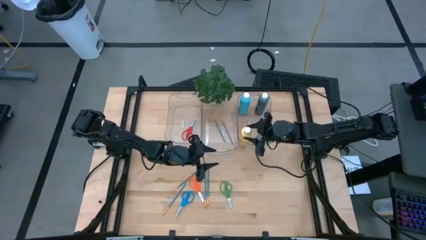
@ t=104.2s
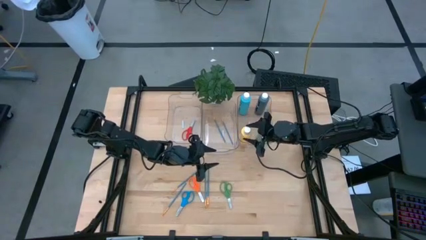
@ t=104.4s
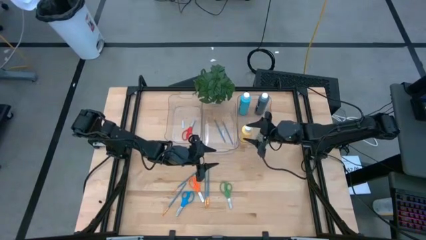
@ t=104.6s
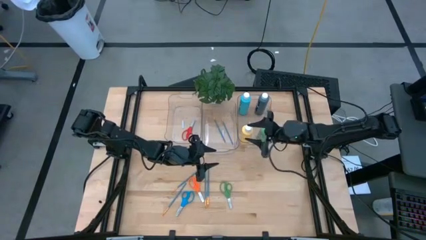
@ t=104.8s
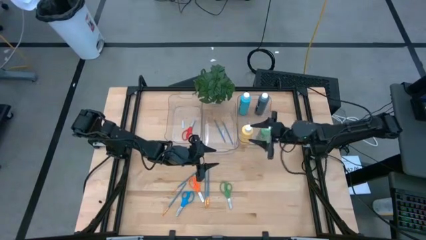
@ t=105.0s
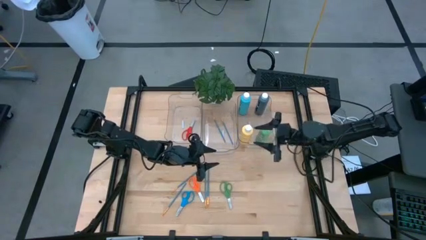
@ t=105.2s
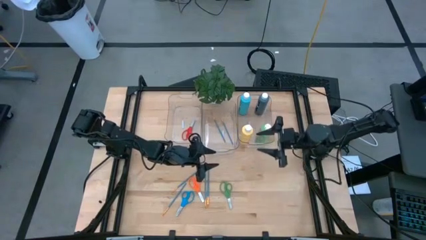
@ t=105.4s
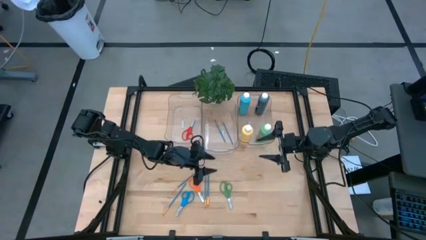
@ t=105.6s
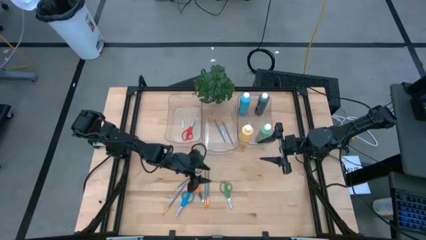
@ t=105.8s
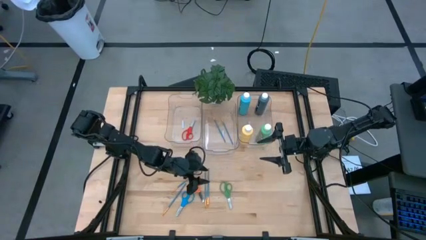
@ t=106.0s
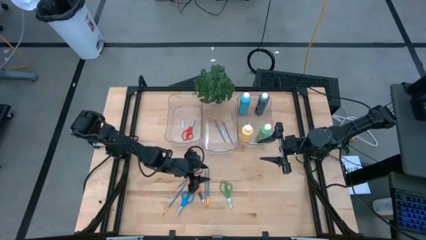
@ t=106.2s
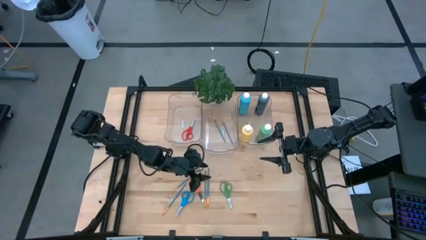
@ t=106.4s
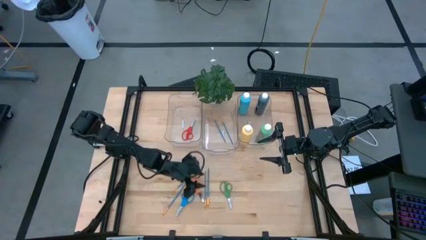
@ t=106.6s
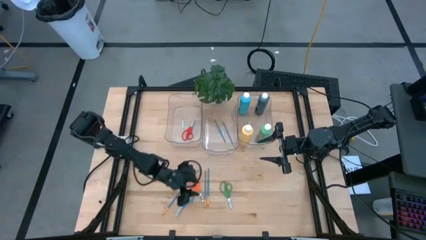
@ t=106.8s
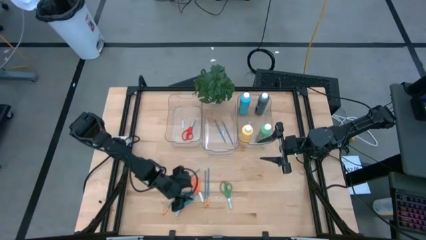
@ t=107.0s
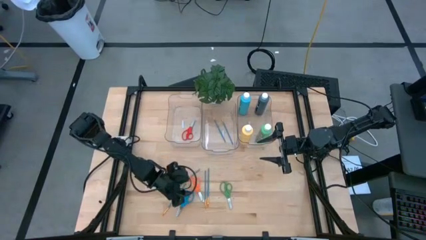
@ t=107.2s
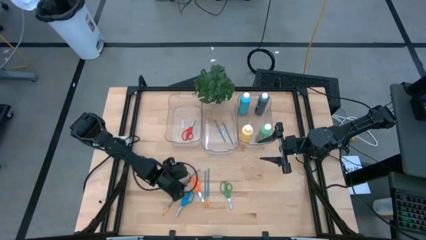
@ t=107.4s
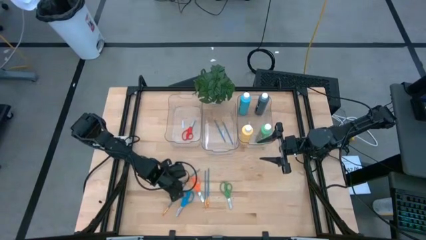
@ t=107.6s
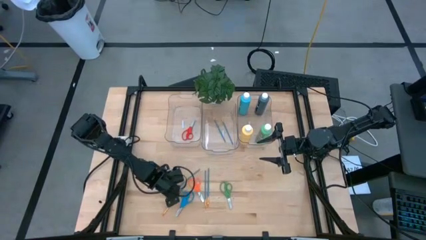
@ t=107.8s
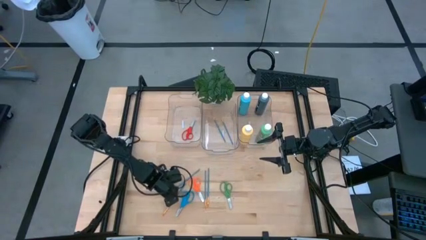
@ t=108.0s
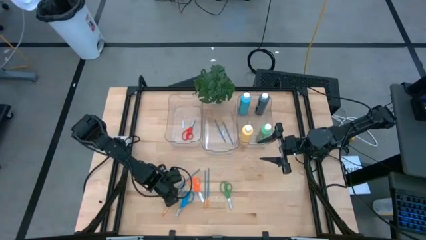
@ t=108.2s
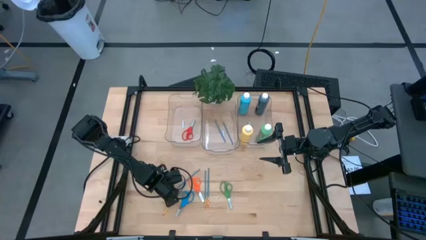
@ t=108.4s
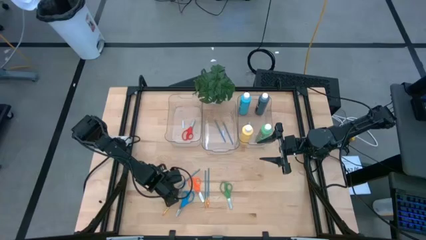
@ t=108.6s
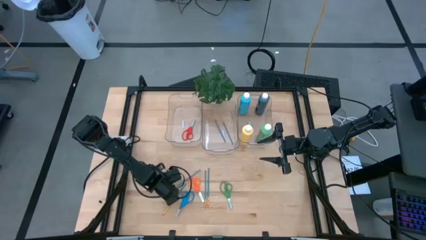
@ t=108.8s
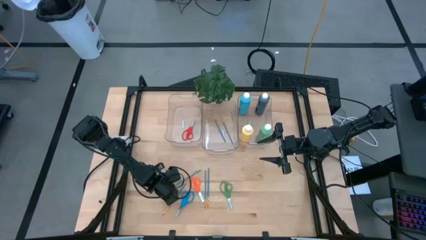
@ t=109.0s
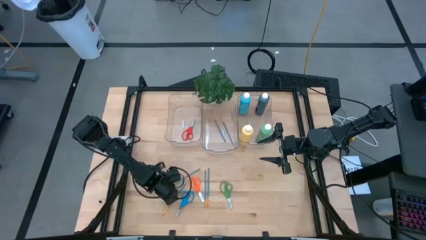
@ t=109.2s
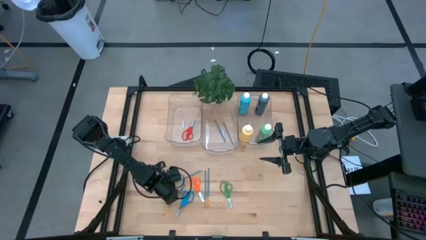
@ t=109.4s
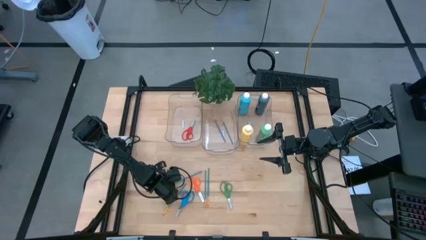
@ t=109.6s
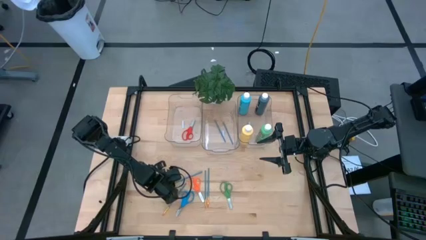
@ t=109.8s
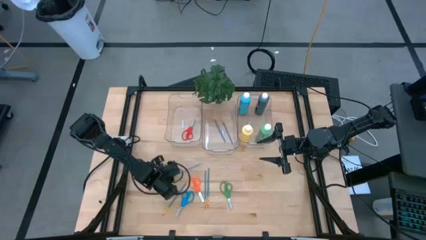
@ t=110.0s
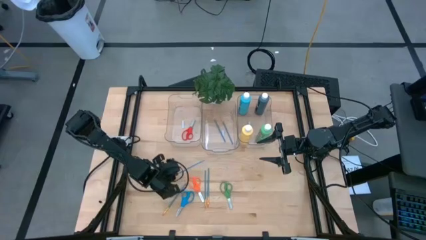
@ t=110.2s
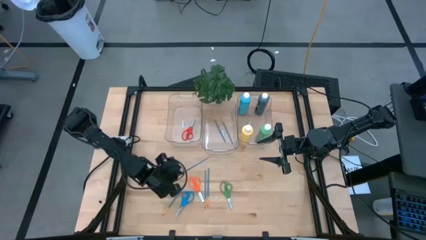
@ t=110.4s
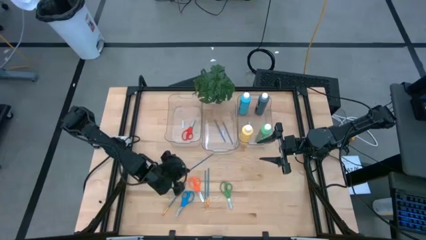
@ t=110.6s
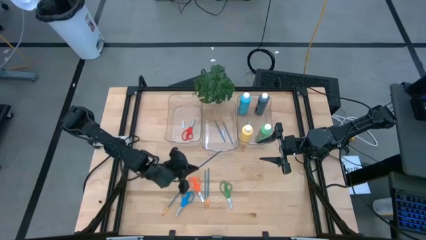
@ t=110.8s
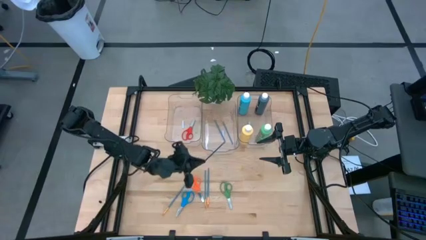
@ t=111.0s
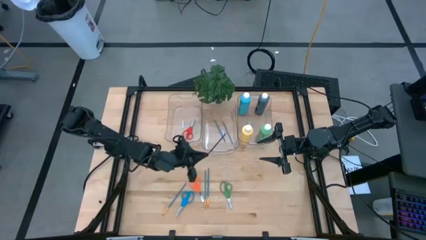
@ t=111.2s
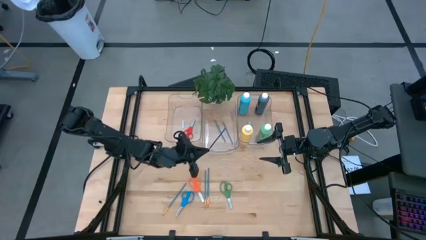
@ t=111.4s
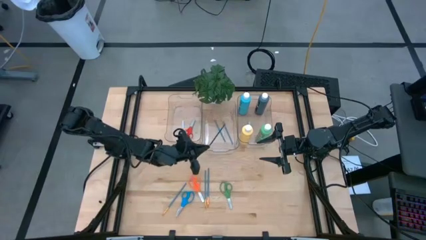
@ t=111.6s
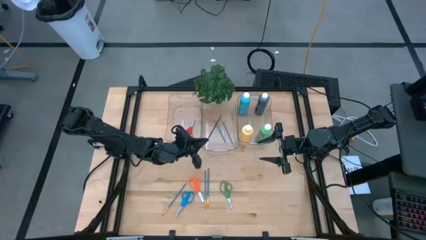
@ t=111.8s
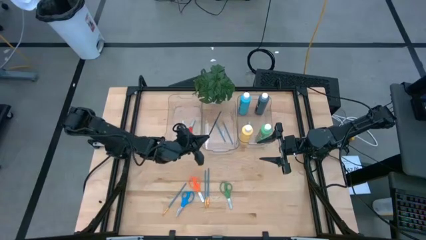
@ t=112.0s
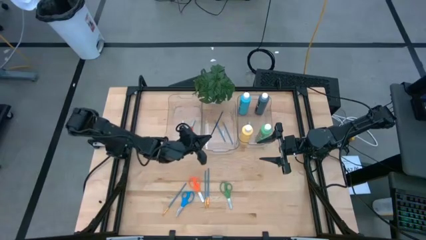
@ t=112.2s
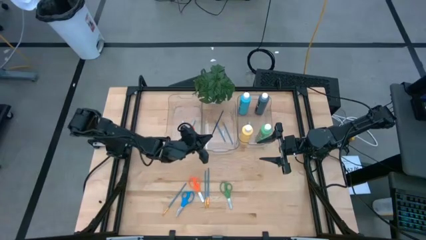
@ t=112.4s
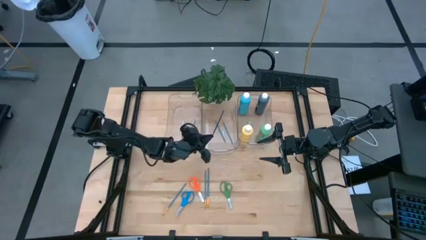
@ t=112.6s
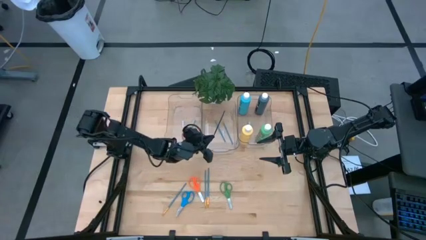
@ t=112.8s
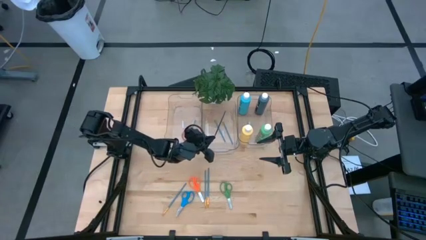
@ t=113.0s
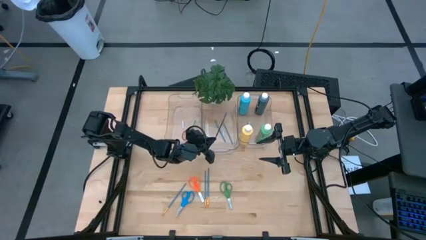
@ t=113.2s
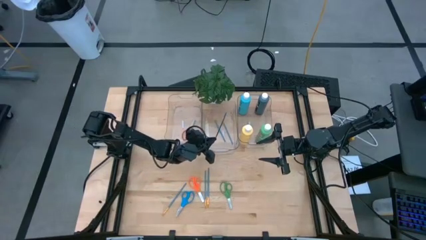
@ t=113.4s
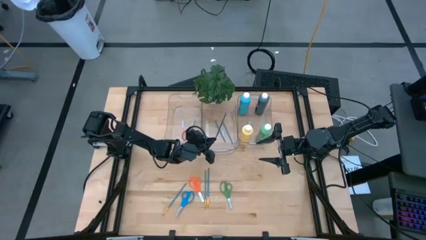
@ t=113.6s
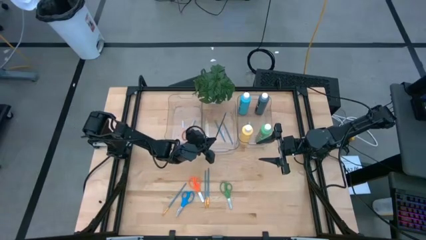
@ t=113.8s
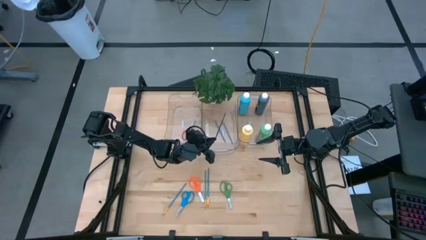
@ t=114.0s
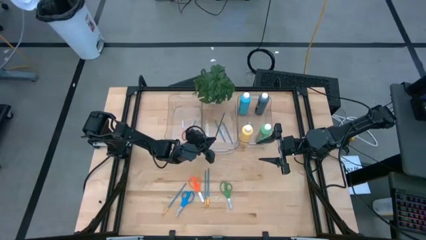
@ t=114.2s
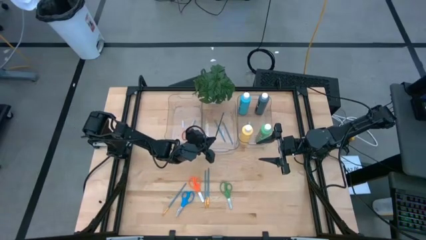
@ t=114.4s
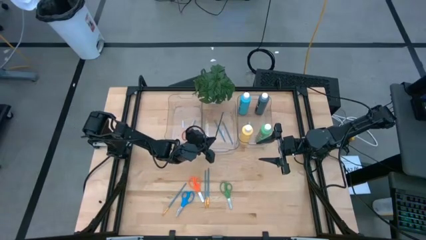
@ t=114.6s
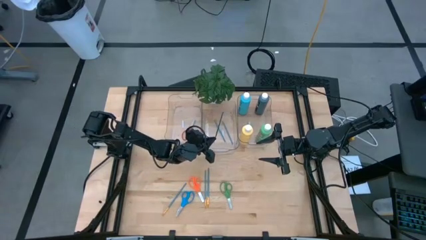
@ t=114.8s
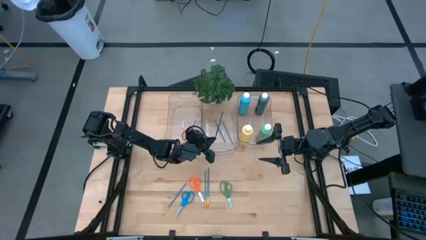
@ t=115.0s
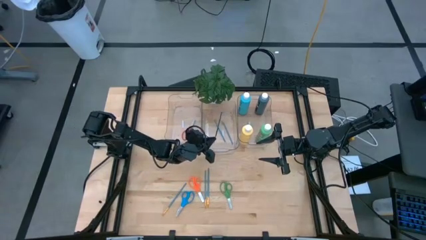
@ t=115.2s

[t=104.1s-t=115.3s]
Task: Pick & Place Paint Supplies
Put the blue paintbrush into the middle transparent bin

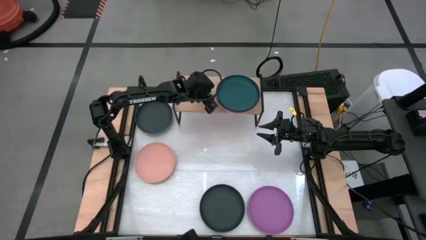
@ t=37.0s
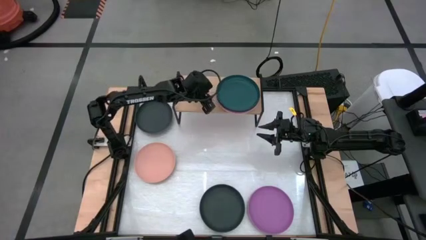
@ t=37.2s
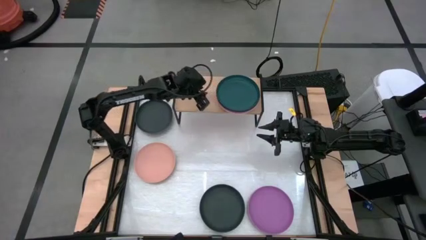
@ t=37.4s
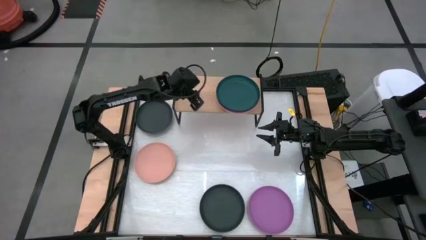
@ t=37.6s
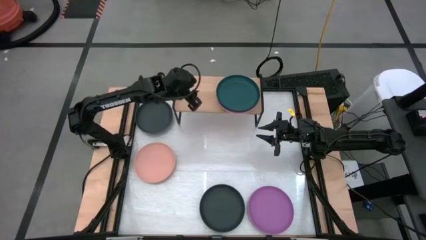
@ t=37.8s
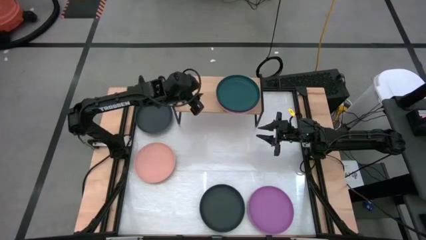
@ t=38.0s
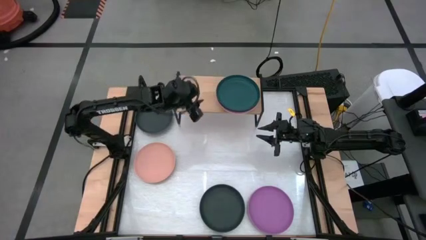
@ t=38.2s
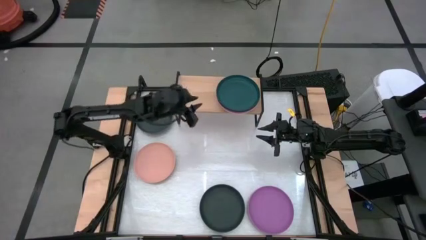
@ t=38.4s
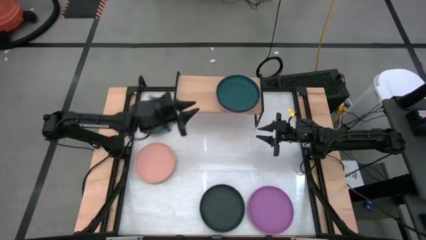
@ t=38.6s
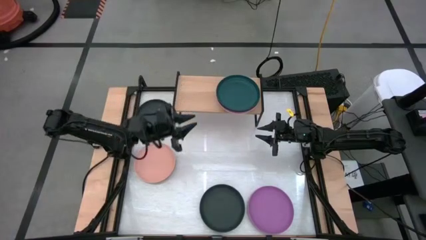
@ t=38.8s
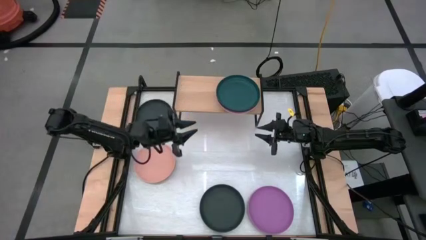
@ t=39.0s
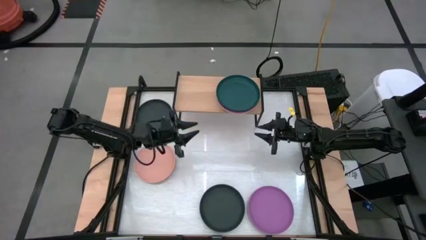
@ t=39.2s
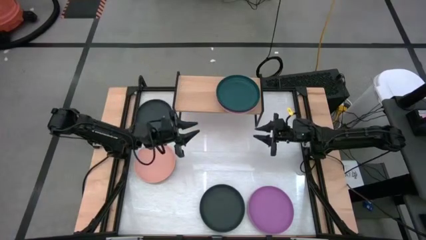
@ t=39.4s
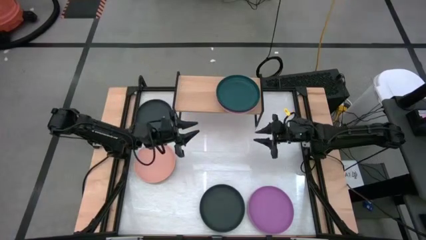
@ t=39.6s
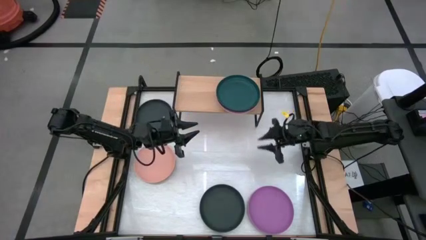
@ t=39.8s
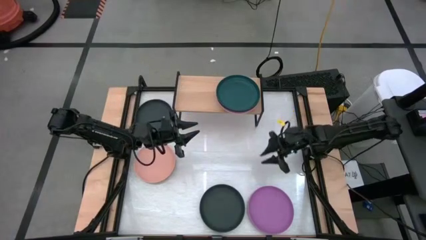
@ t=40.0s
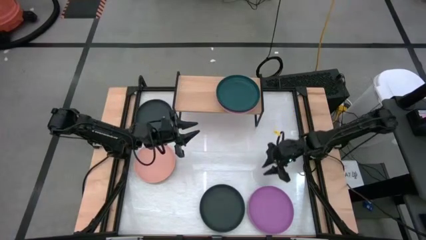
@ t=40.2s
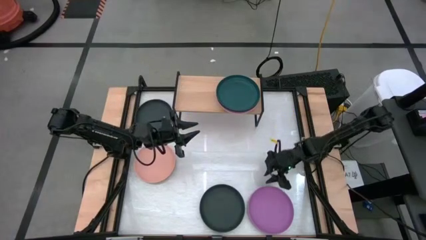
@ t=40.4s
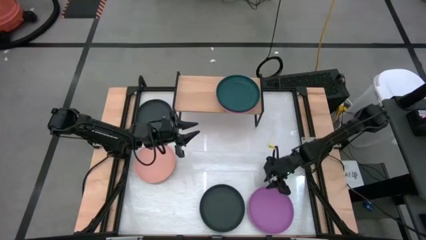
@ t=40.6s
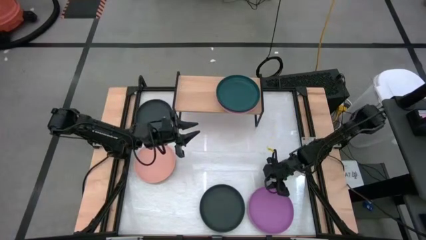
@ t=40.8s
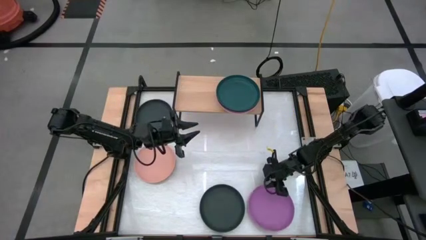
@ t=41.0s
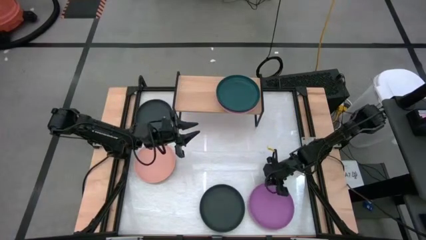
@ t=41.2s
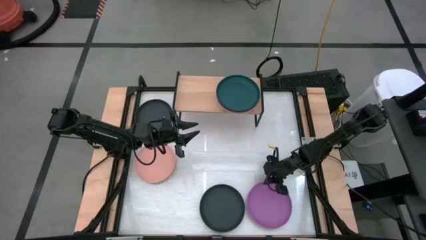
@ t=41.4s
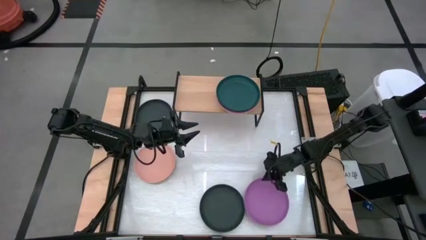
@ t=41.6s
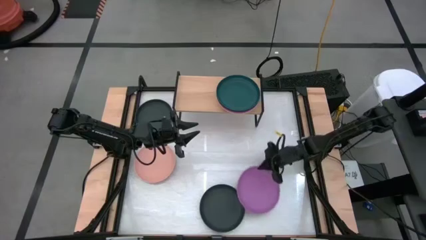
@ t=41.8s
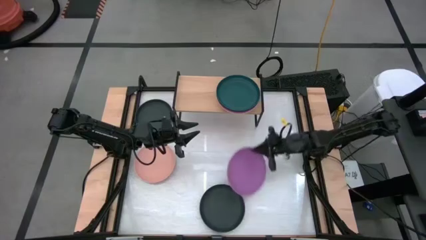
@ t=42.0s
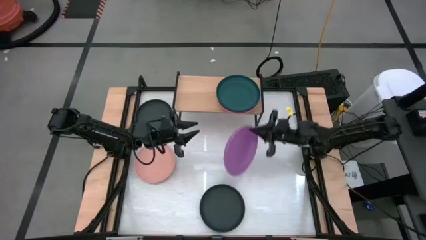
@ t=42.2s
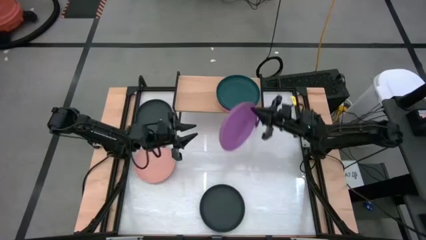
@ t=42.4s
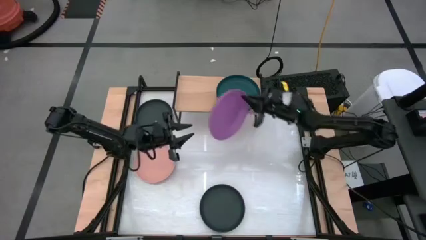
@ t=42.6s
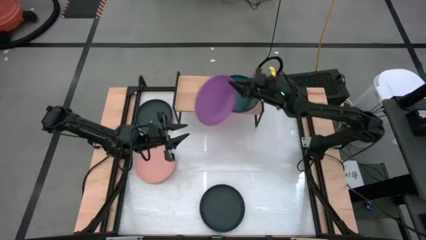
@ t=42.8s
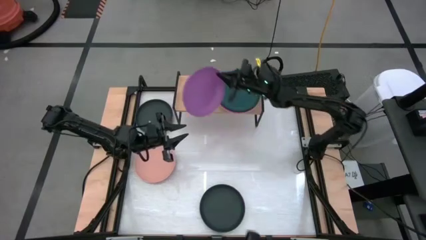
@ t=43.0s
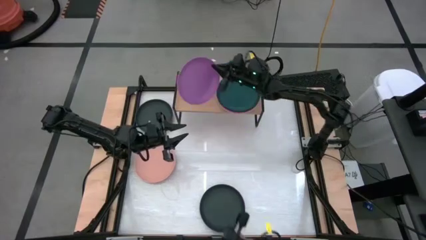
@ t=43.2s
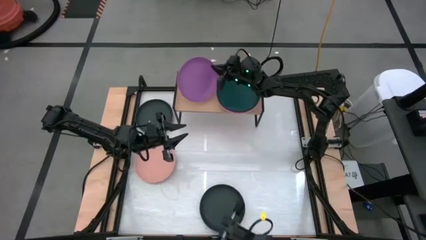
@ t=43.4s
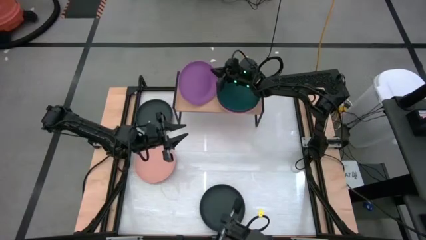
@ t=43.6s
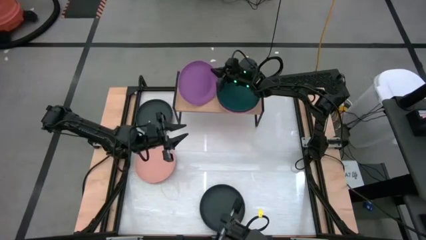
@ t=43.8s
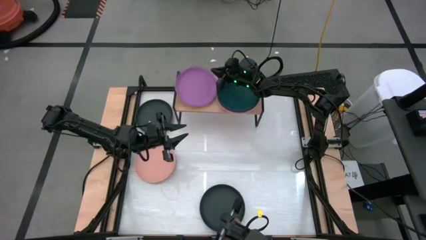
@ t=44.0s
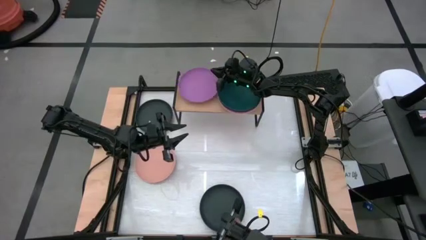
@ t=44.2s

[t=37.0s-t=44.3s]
Task: Place and stack plates onto a shelf
Put the purple plate on the shelf
